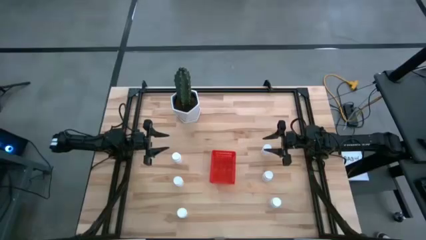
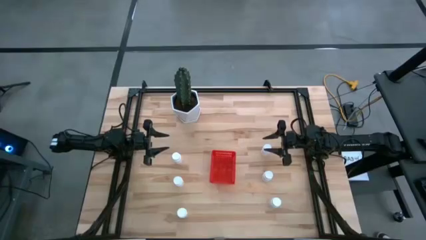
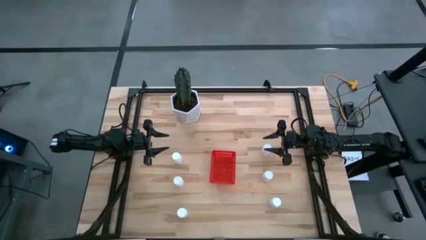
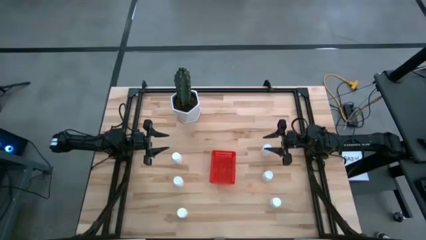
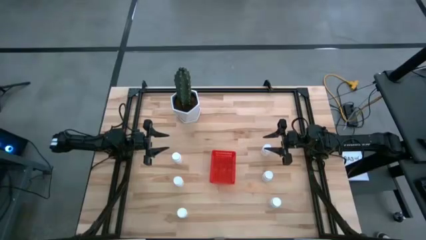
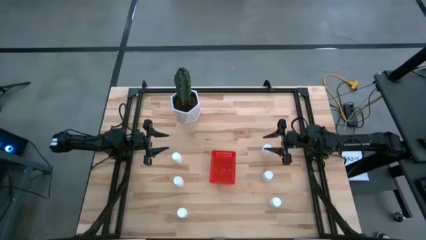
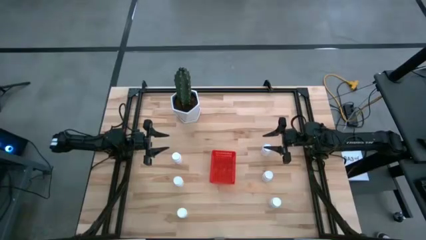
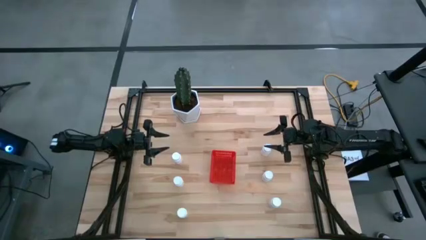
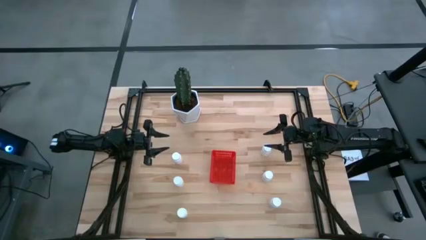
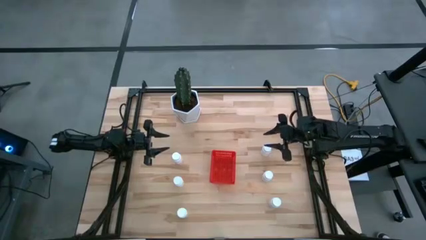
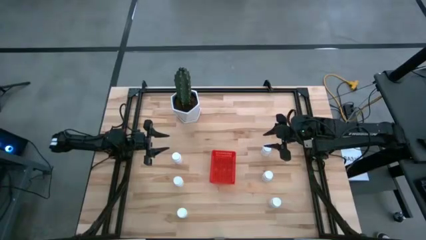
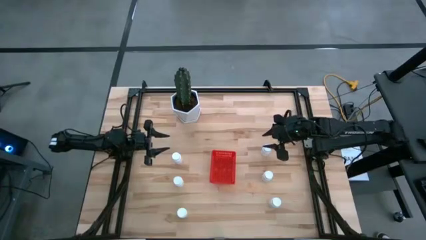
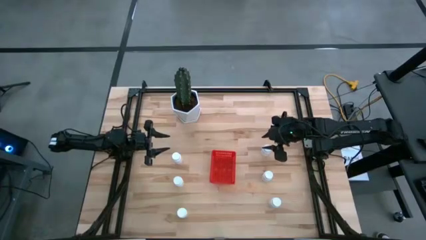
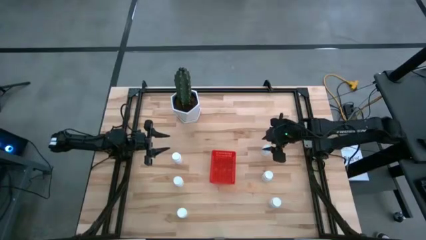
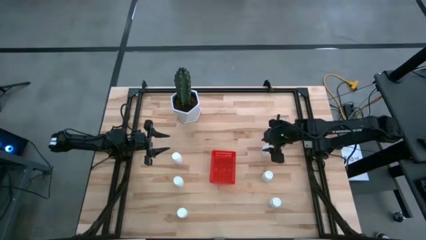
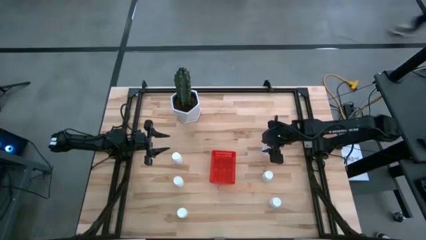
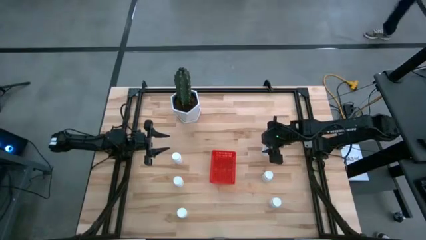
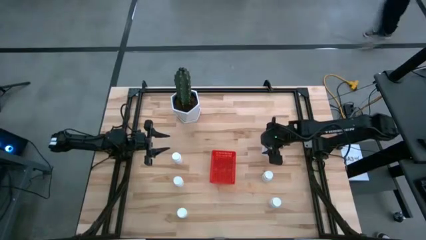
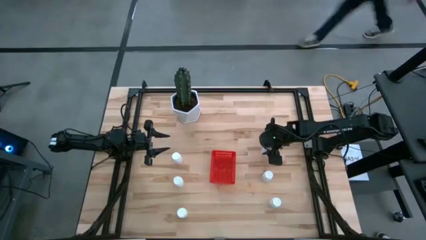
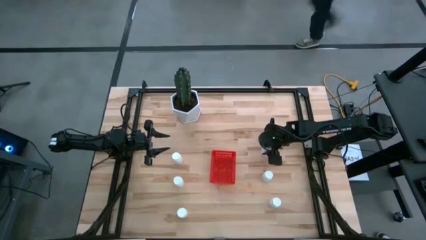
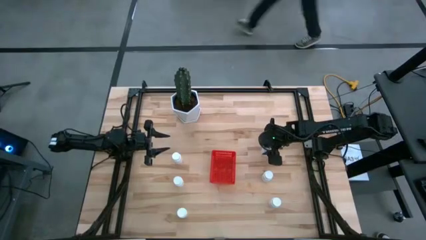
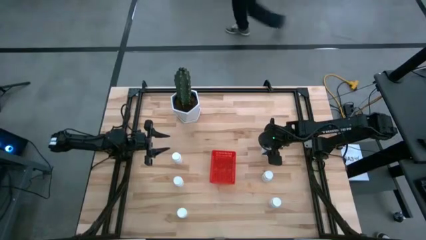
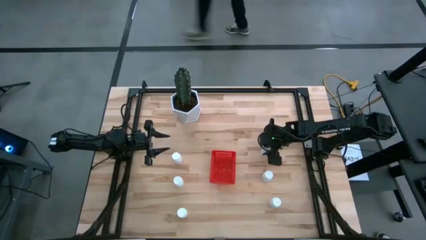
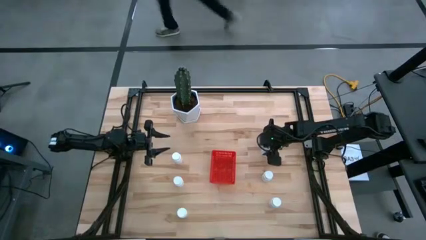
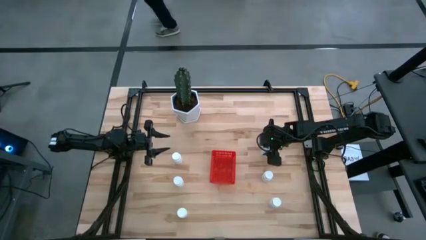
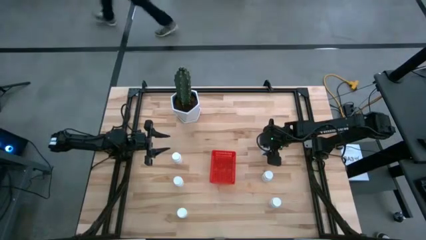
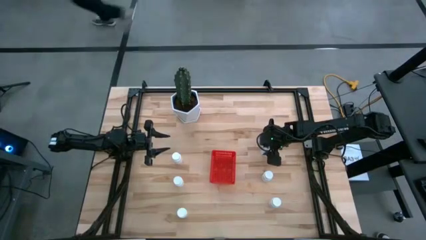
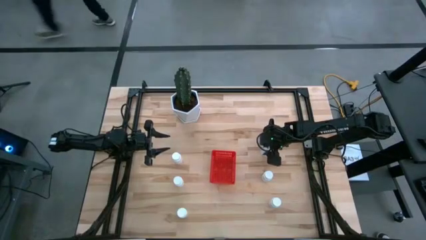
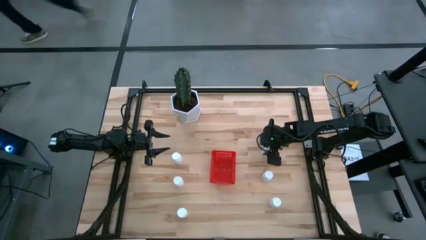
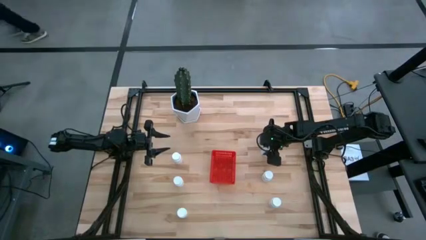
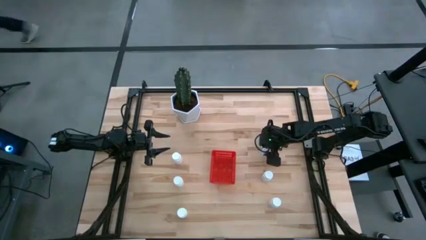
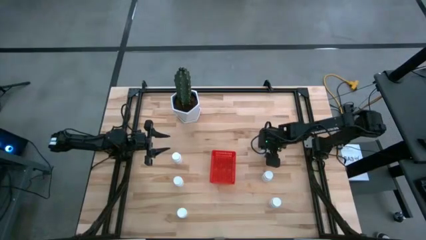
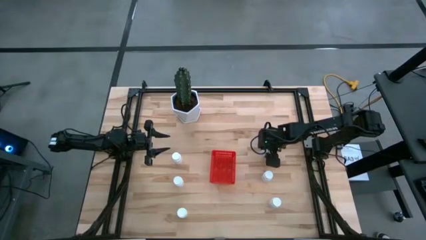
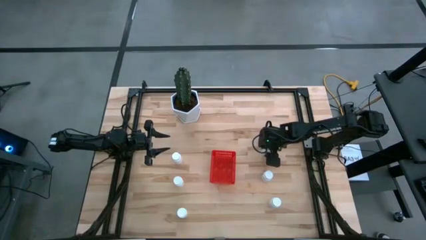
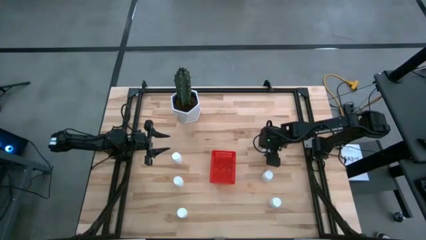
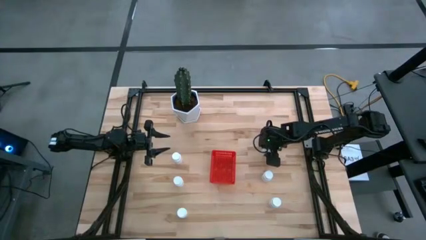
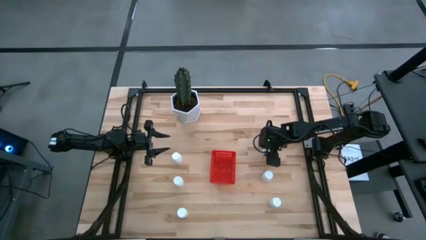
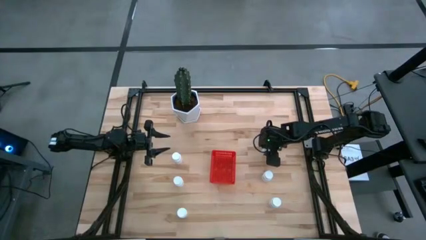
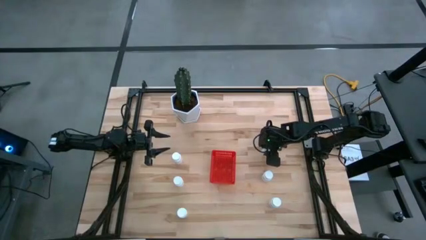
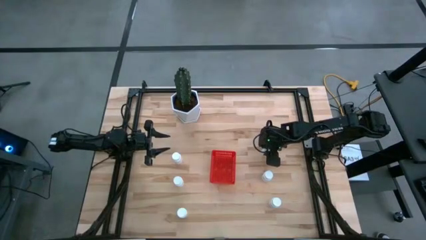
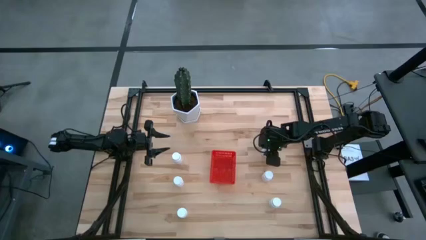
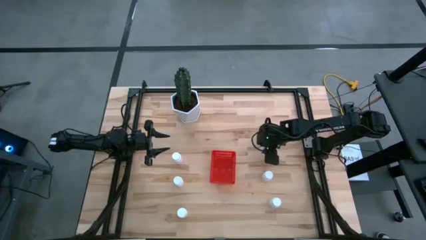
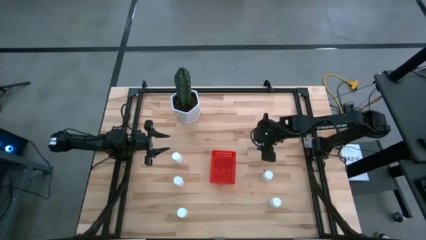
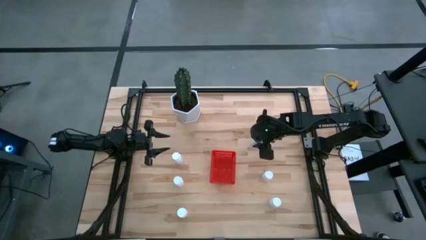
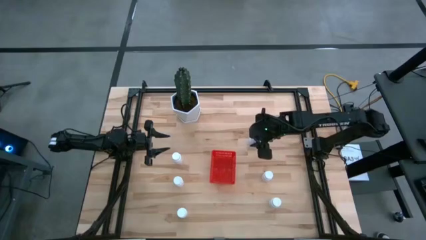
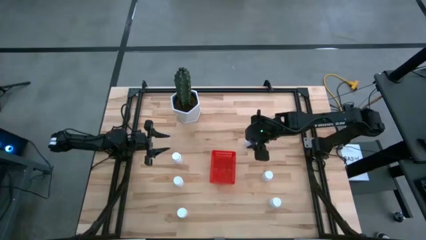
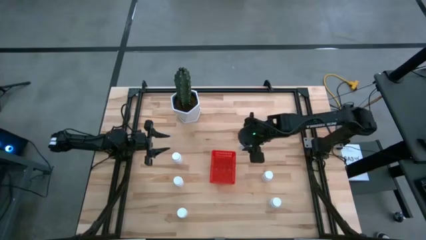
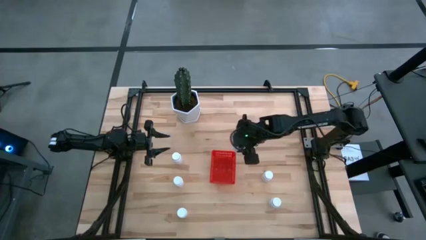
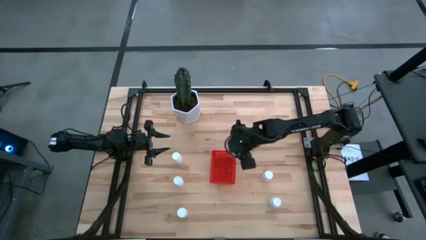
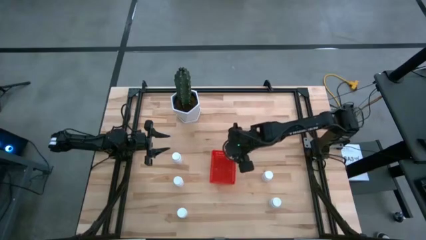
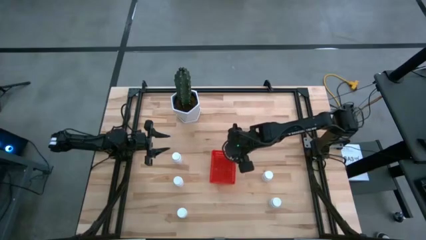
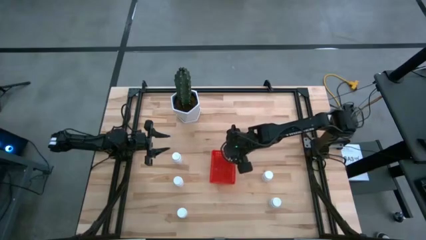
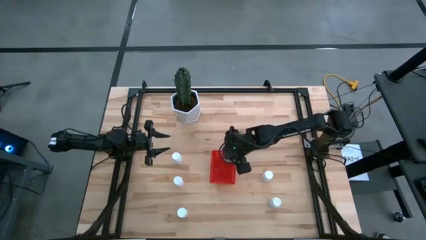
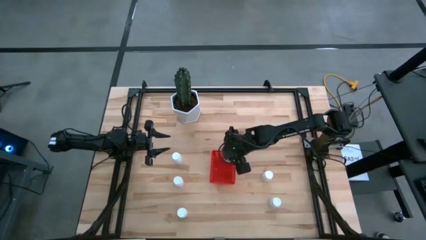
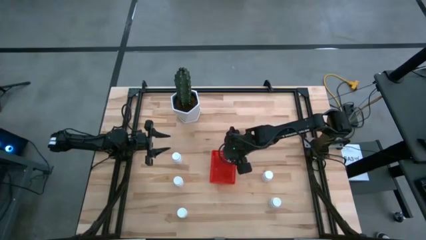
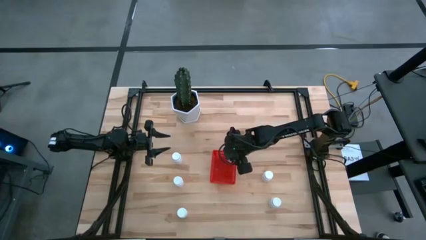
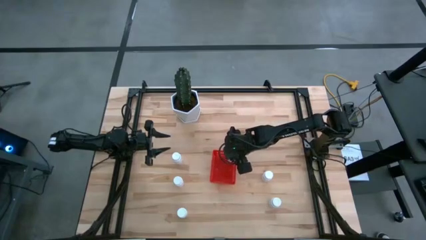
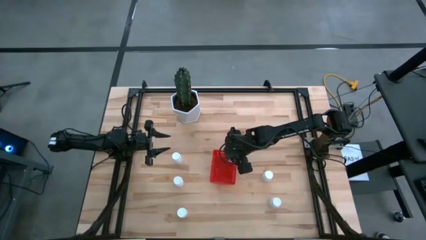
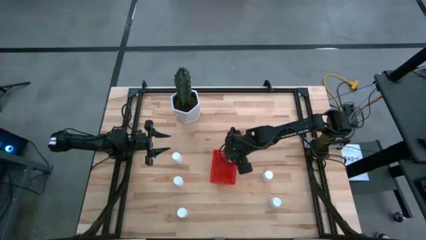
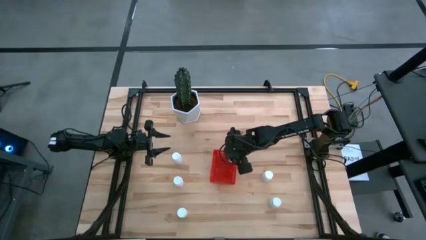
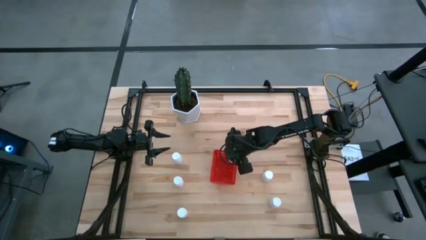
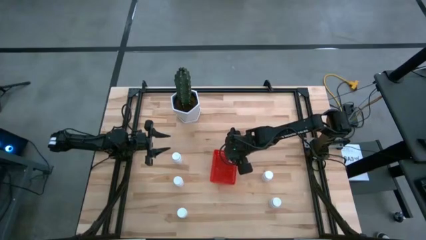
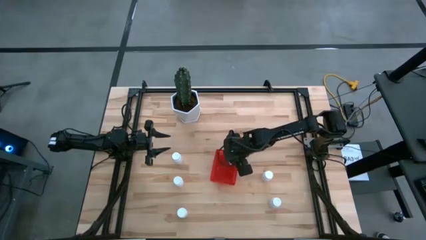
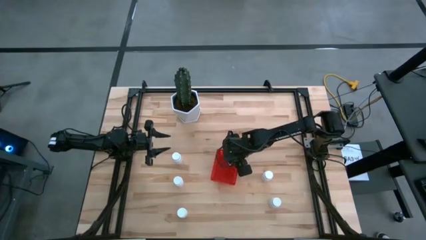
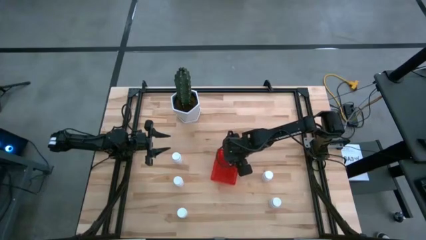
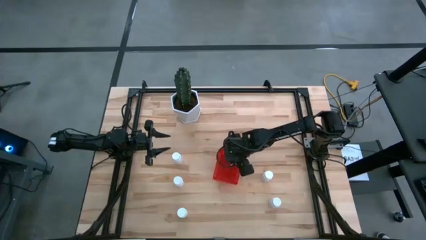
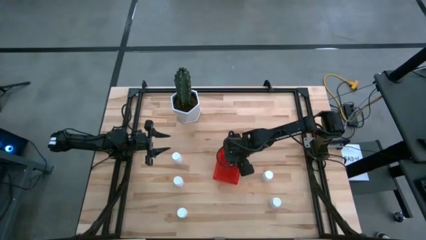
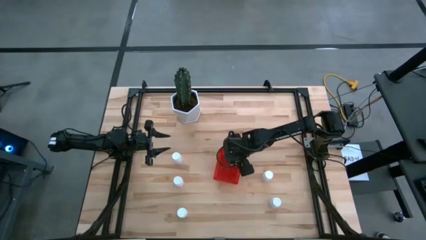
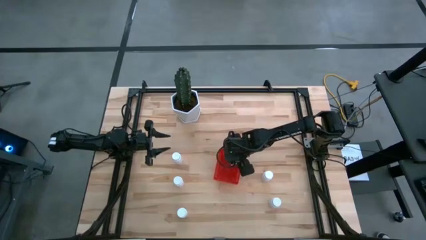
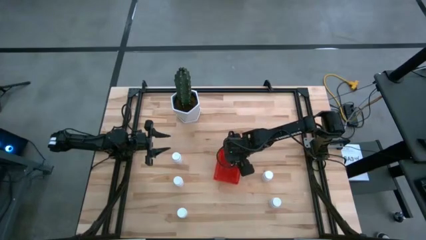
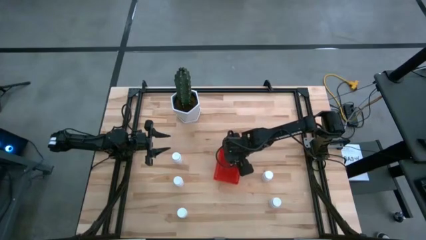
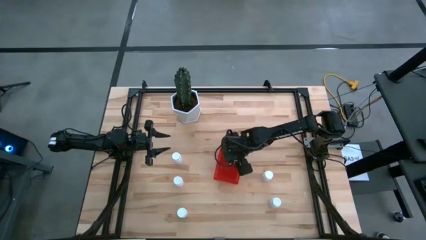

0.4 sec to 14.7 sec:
Task: Pick and place pill bottles into a basket
Put the white pill bottle into the red bin
